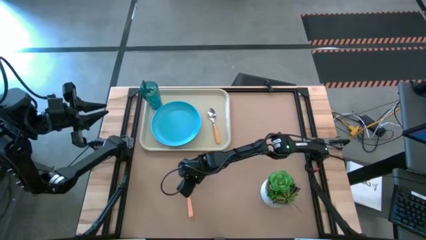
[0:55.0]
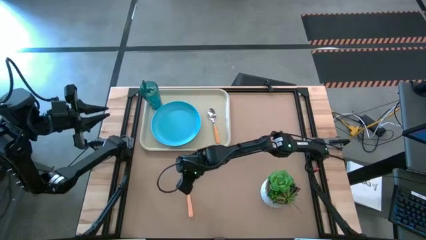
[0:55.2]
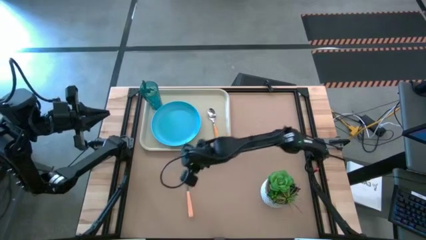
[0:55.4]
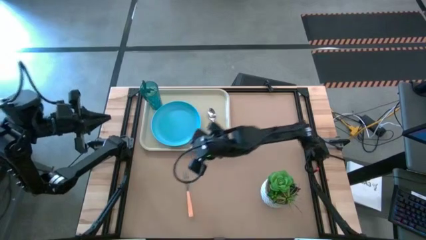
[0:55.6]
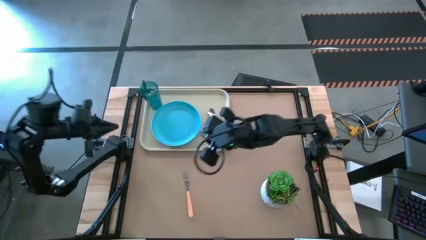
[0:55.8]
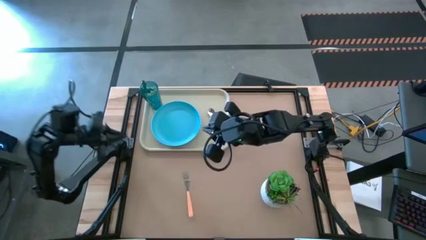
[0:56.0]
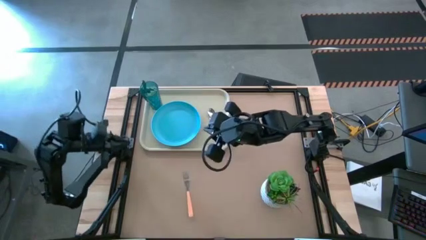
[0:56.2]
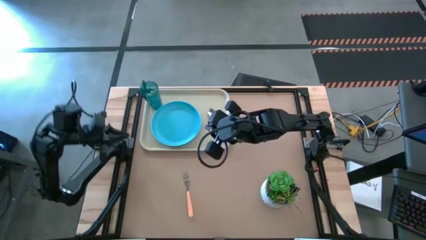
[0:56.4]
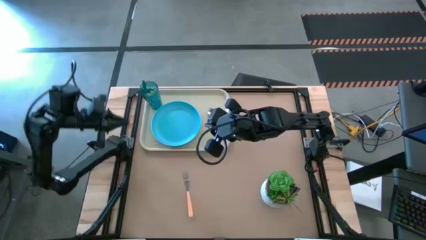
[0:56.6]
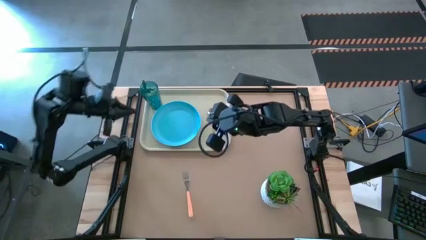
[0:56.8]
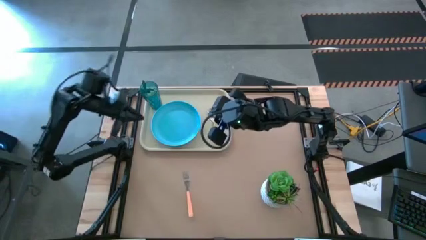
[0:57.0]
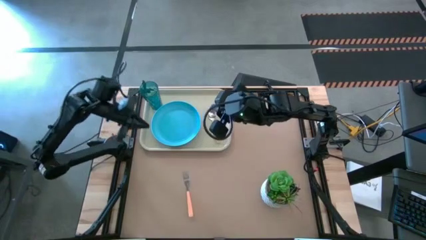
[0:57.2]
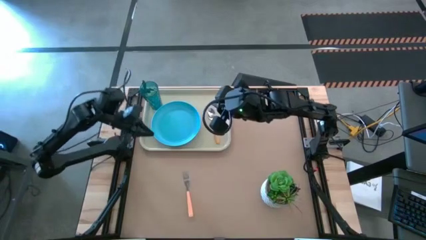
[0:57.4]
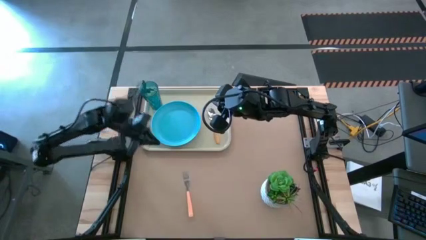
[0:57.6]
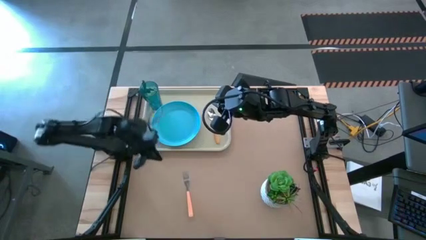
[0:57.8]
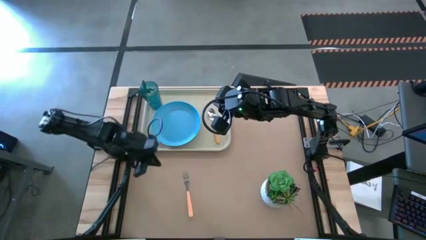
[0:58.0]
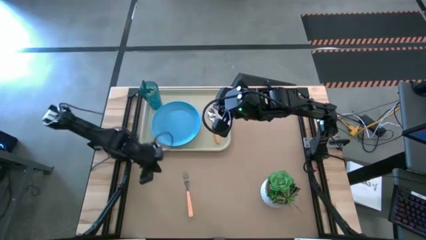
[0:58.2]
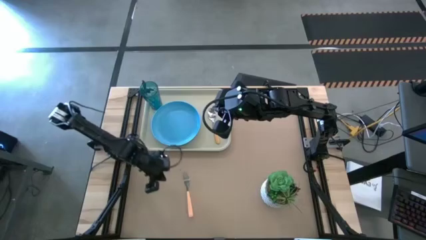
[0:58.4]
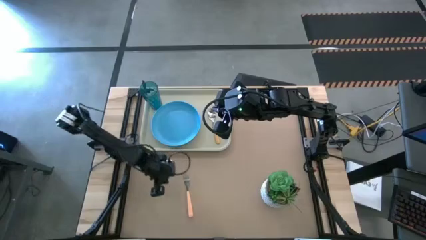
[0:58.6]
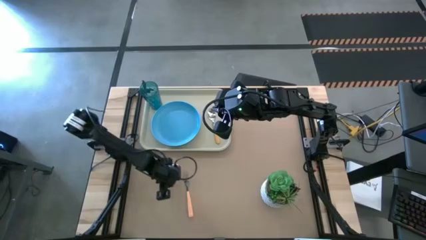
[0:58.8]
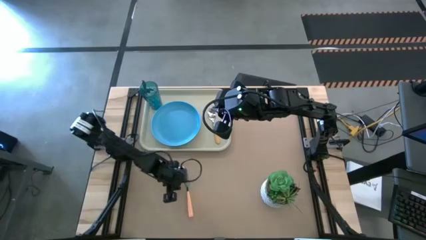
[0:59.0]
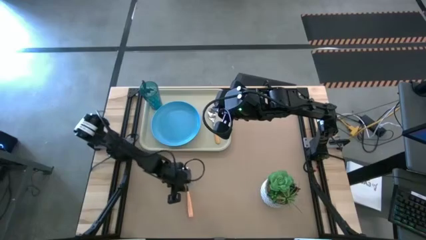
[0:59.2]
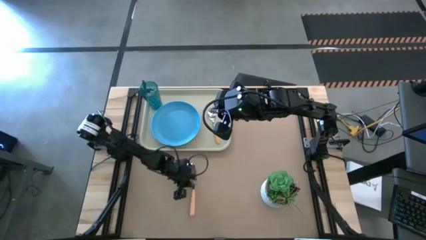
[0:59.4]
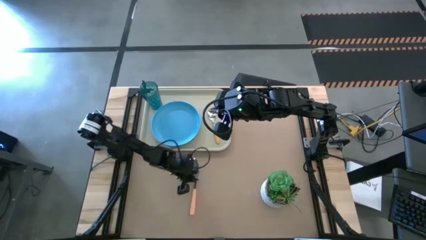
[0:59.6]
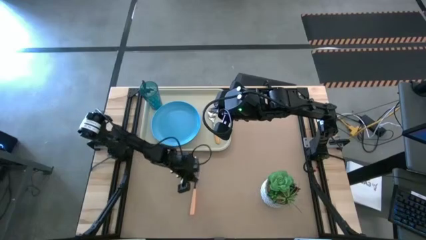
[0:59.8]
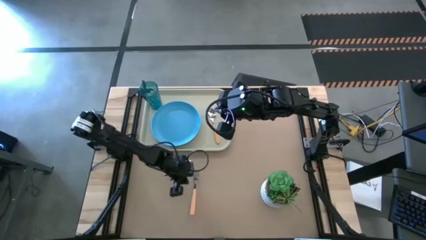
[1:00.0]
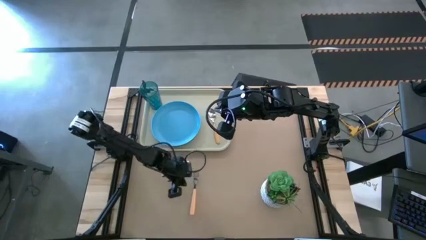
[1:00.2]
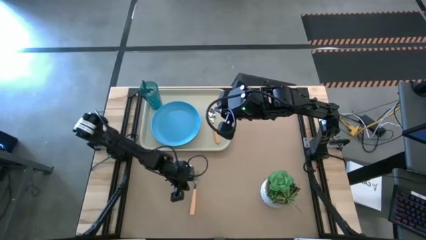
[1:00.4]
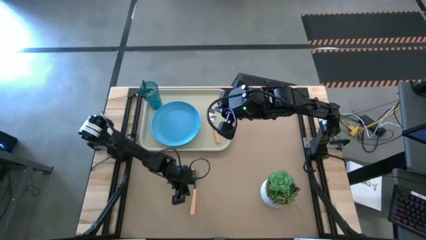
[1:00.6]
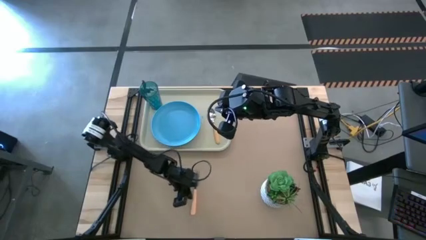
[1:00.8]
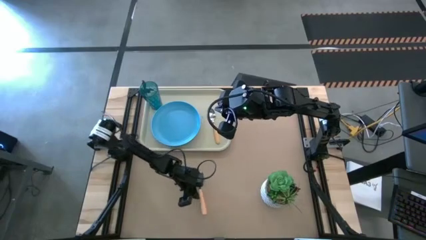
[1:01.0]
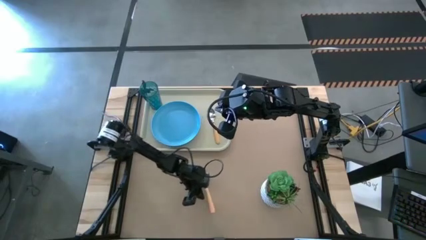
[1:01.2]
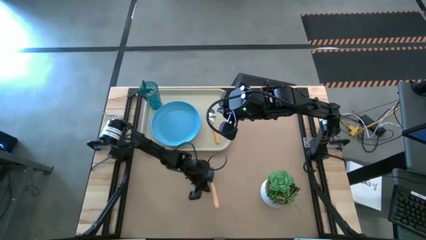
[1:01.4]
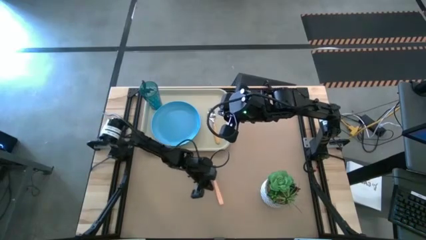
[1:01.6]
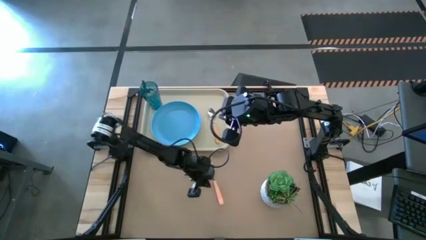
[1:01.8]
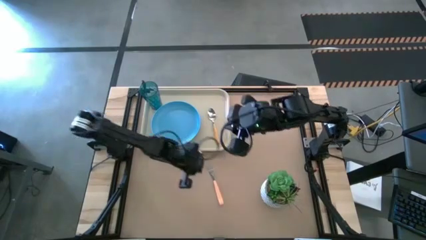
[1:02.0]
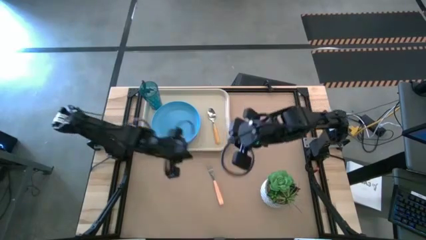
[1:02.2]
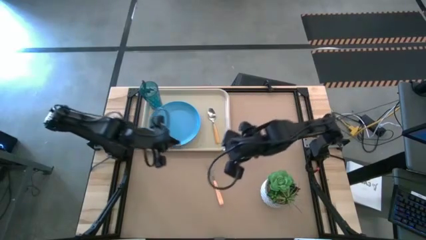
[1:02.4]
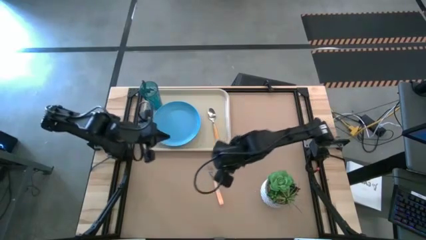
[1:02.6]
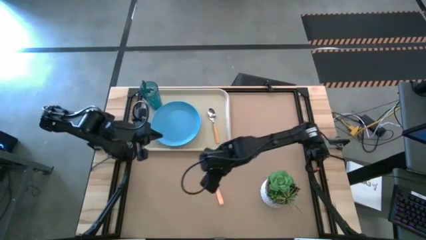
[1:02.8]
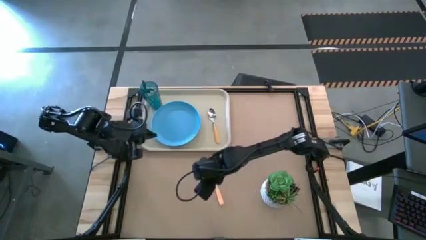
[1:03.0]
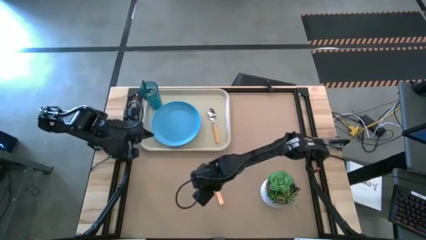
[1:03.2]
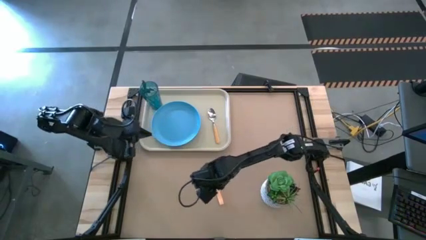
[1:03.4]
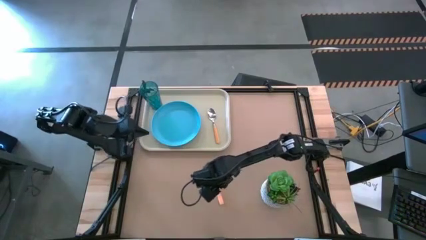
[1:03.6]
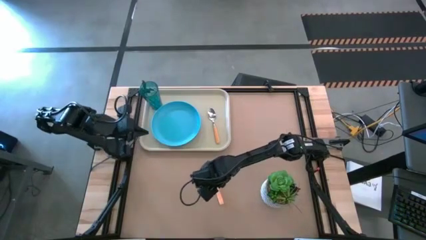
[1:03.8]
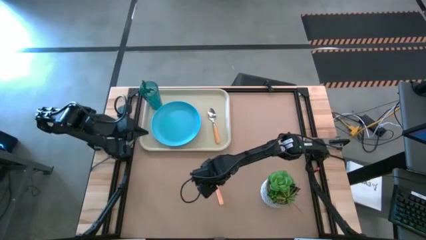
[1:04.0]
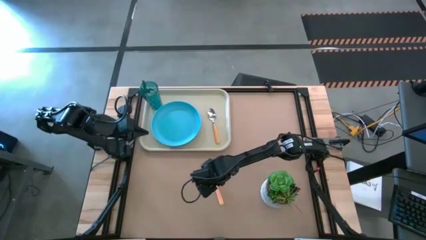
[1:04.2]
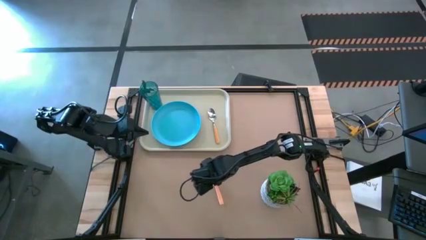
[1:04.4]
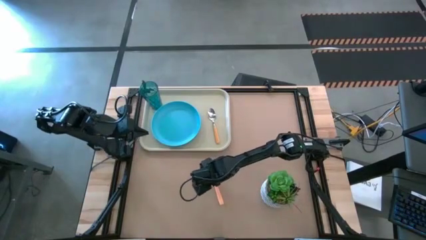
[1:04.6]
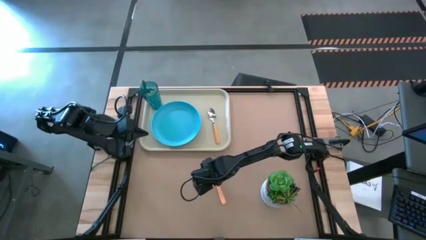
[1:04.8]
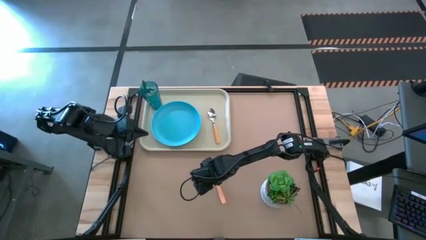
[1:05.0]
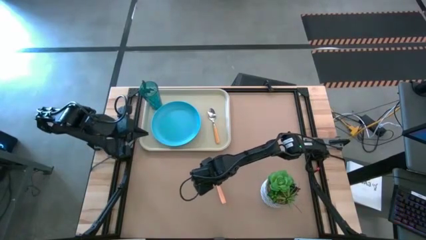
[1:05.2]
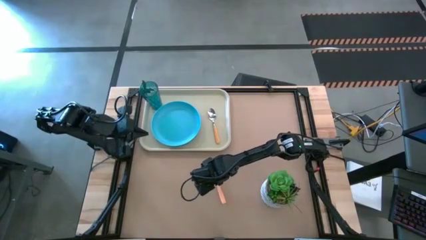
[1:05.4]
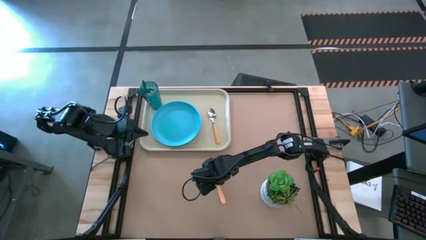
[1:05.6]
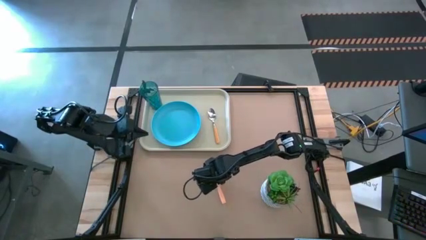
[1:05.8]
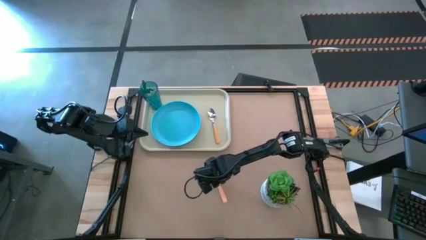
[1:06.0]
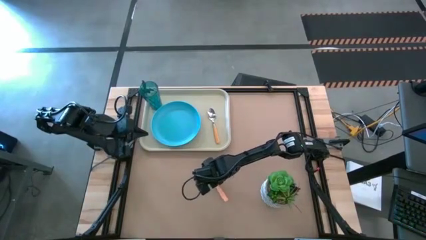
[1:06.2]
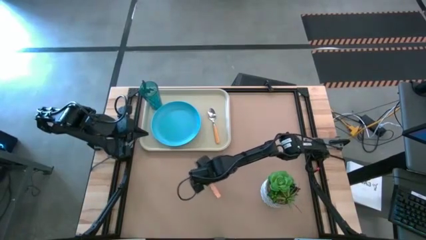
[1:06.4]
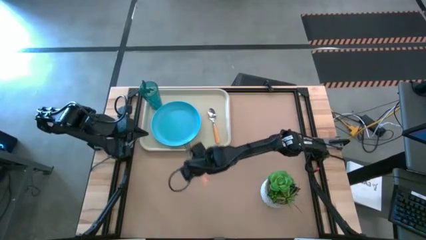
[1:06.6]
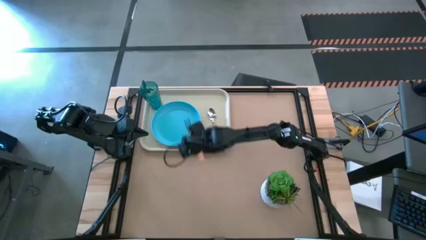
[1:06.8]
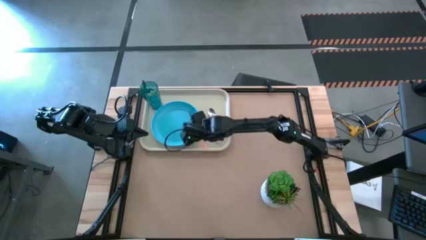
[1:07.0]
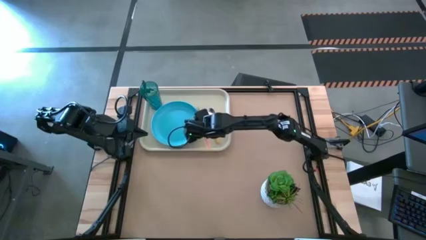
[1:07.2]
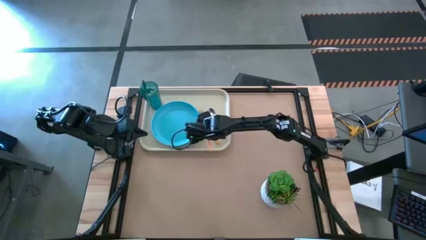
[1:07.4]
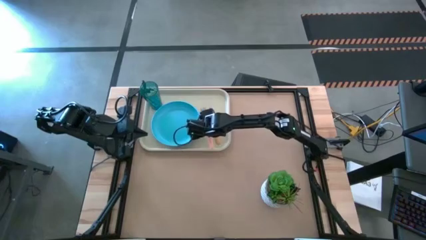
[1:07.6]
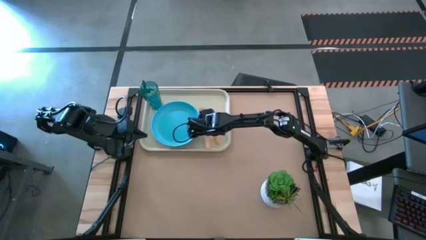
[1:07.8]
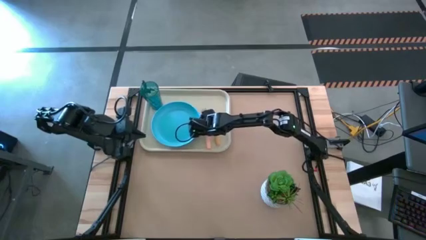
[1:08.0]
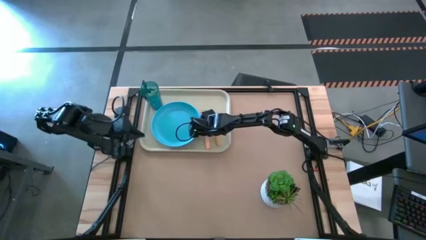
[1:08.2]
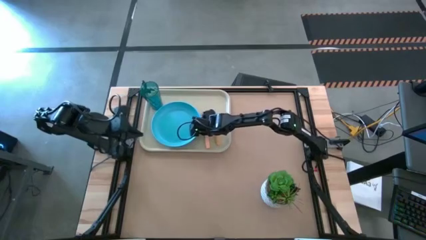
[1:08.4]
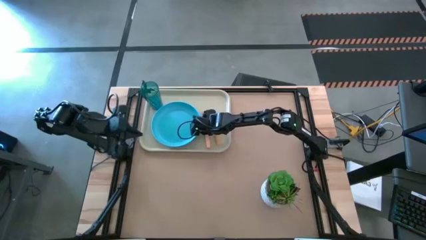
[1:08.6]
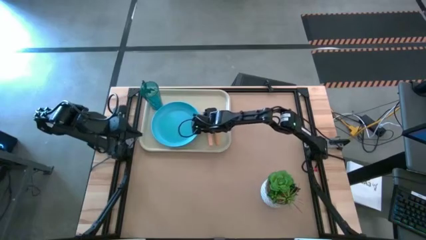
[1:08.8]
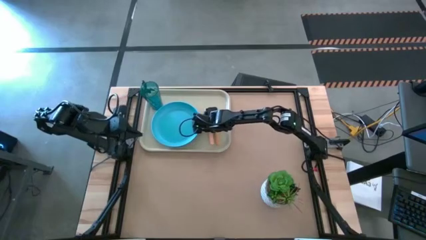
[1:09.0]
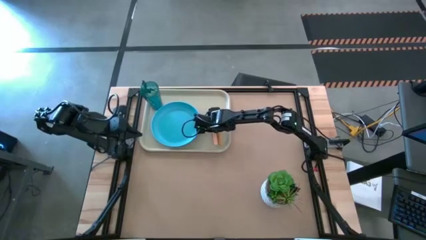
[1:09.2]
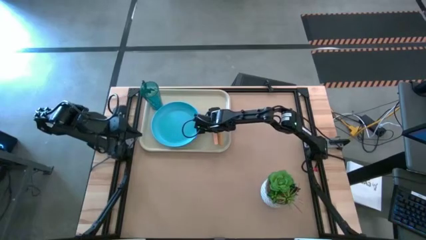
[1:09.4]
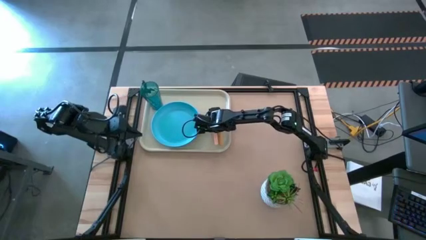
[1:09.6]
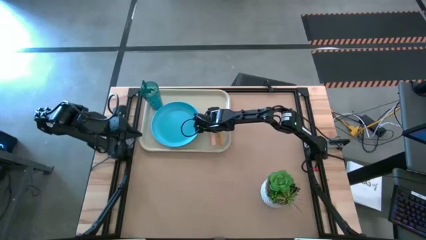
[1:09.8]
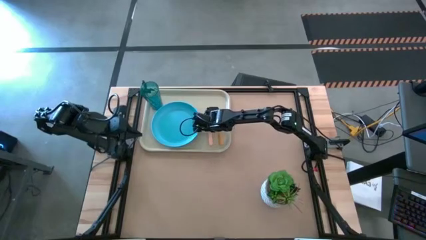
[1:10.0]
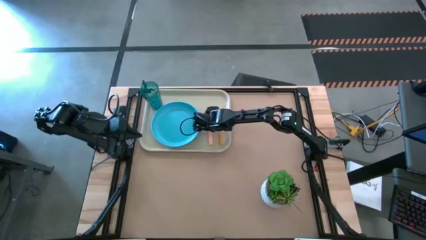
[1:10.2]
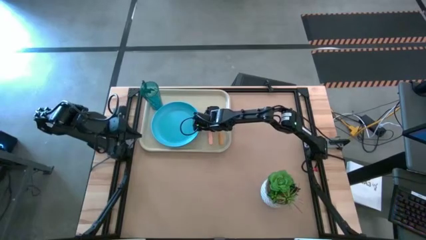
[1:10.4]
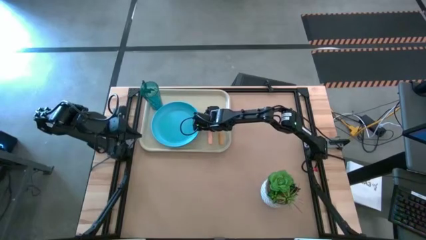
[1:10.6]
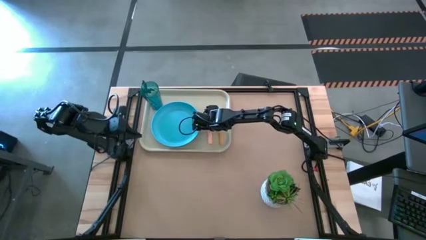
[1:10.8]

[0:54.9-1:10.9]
Task: Pick and place plate/cup/fork/spoon on tray
Put the fork on the white serving tray to the right of the light blue plate
